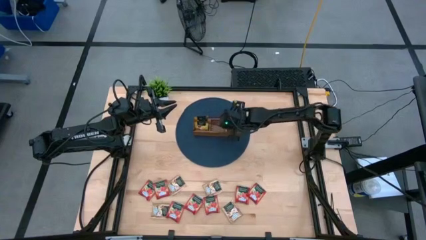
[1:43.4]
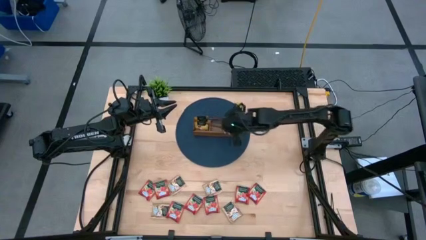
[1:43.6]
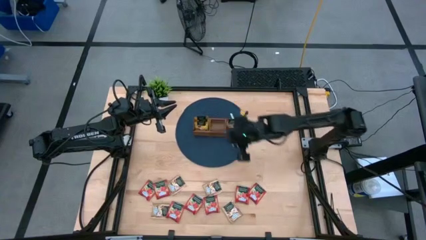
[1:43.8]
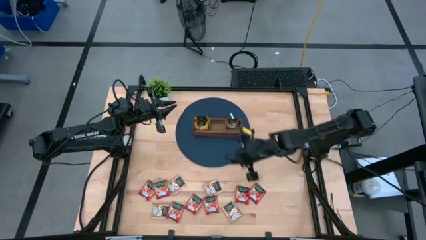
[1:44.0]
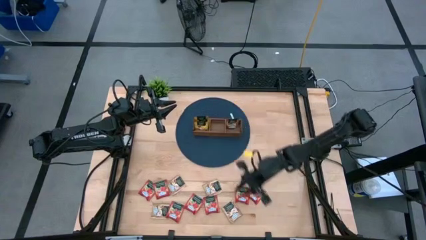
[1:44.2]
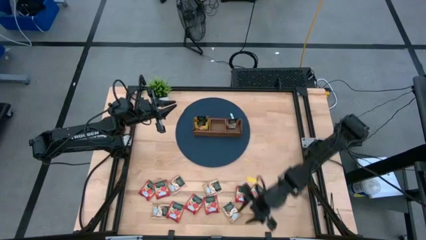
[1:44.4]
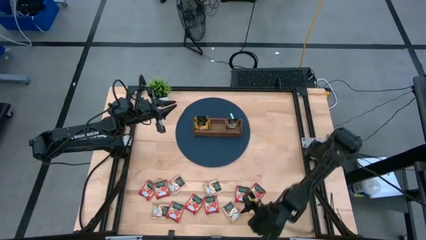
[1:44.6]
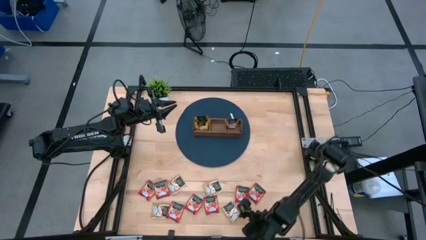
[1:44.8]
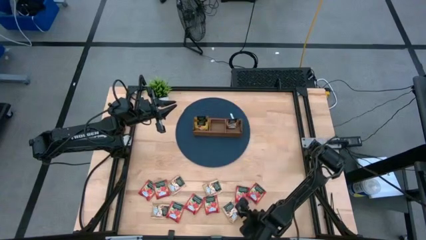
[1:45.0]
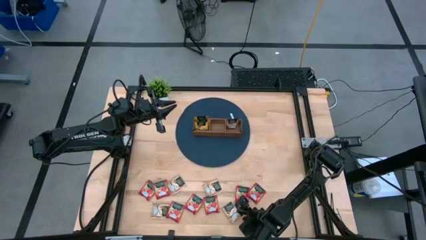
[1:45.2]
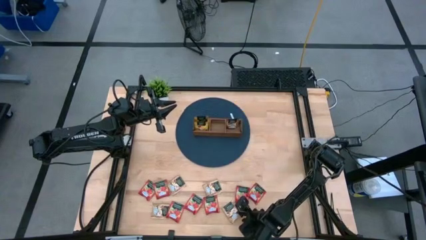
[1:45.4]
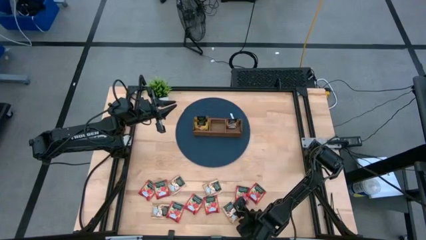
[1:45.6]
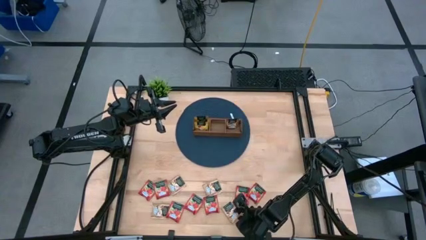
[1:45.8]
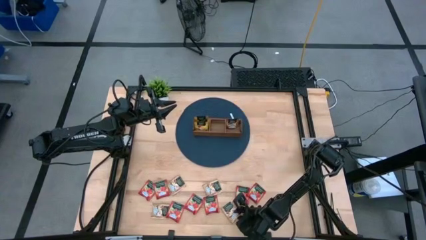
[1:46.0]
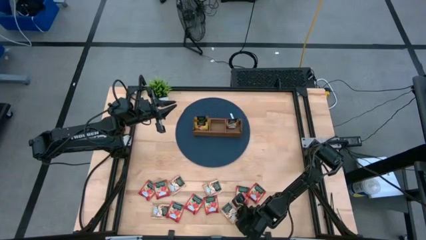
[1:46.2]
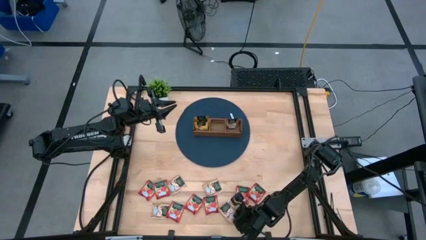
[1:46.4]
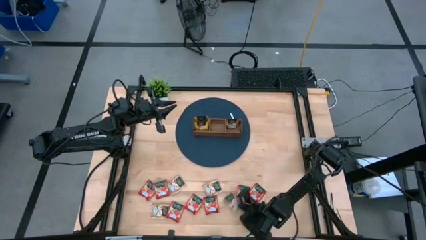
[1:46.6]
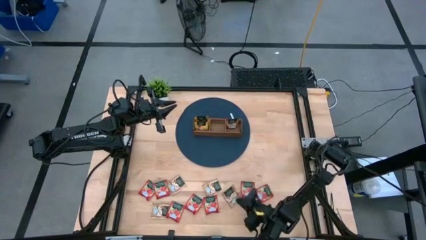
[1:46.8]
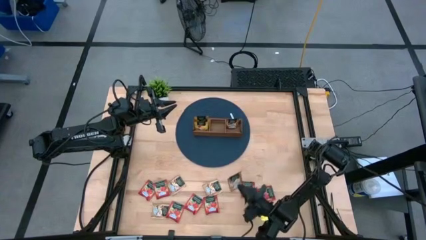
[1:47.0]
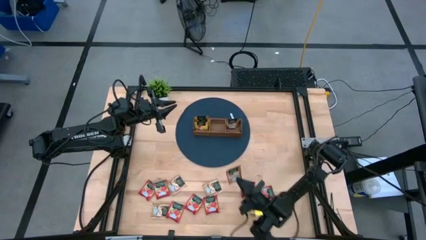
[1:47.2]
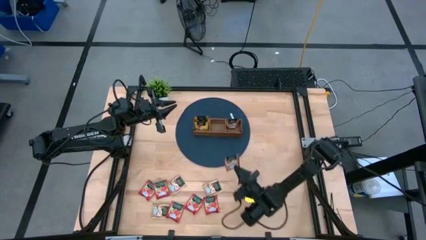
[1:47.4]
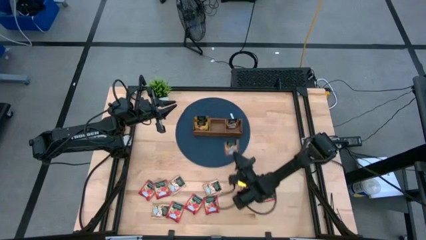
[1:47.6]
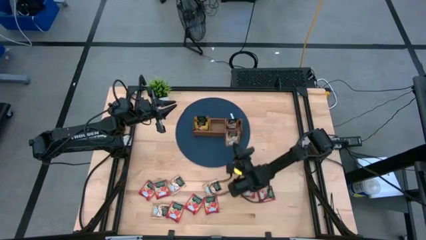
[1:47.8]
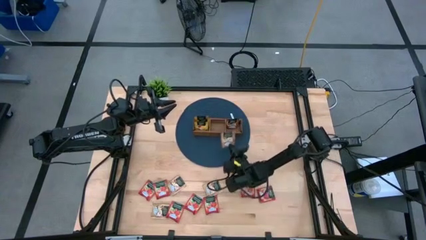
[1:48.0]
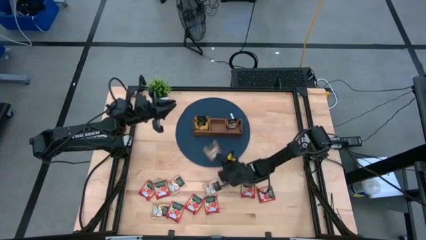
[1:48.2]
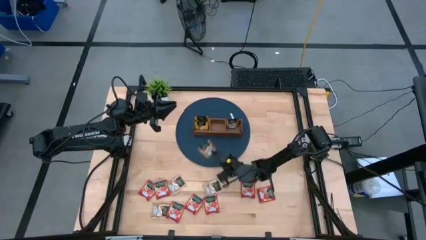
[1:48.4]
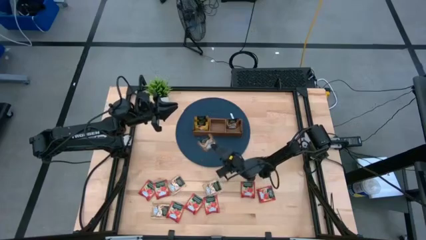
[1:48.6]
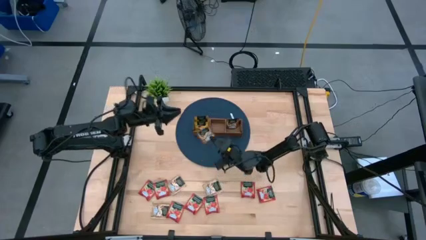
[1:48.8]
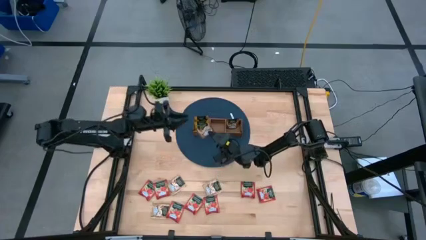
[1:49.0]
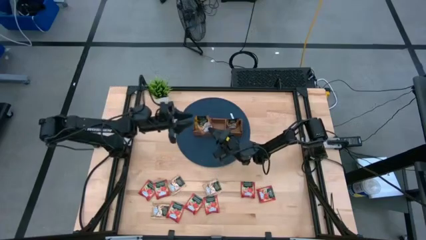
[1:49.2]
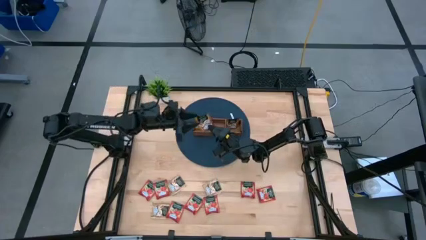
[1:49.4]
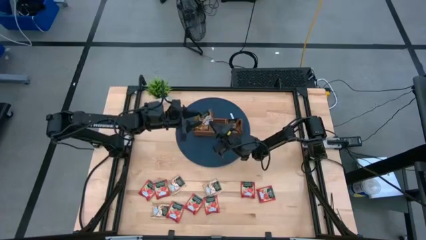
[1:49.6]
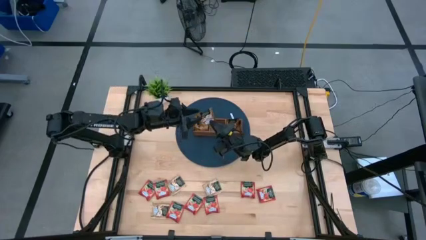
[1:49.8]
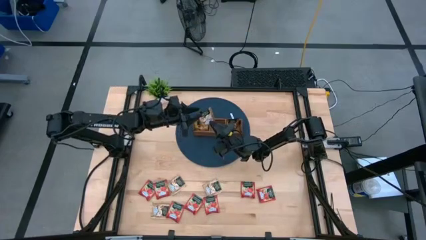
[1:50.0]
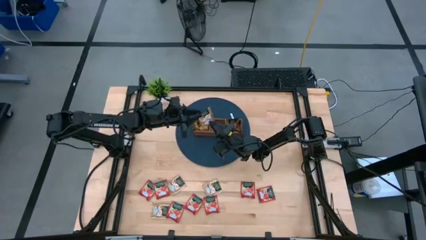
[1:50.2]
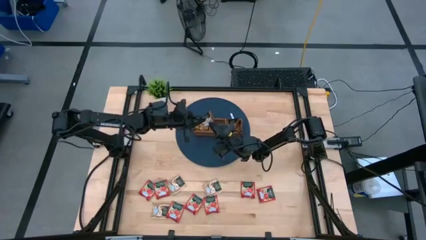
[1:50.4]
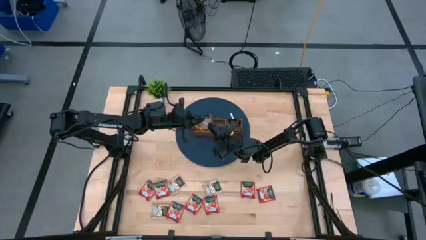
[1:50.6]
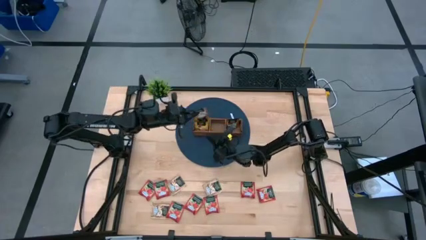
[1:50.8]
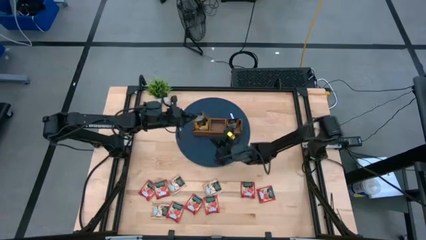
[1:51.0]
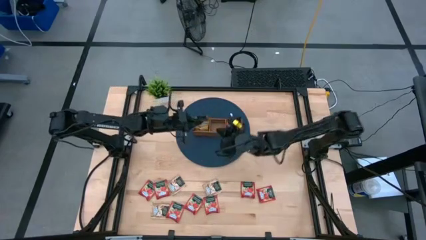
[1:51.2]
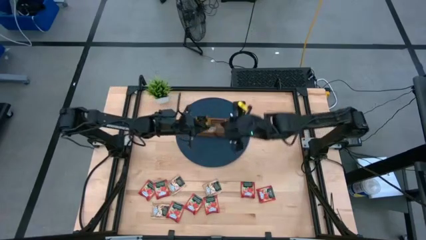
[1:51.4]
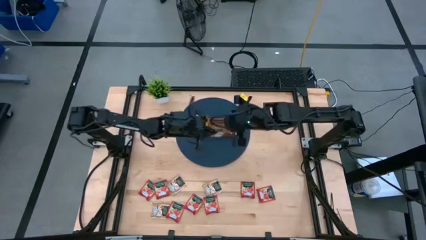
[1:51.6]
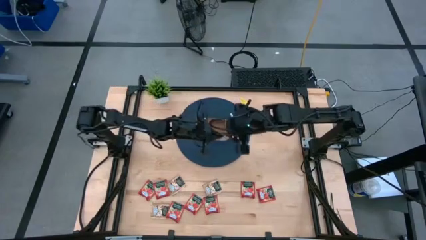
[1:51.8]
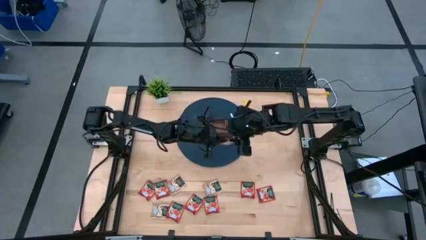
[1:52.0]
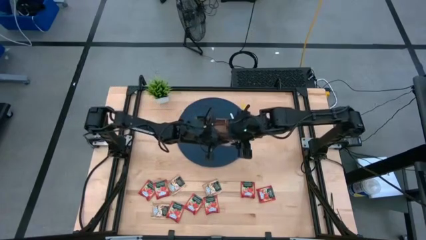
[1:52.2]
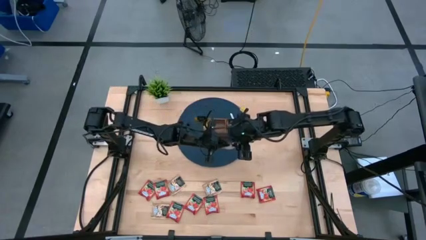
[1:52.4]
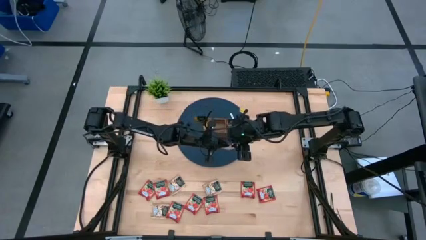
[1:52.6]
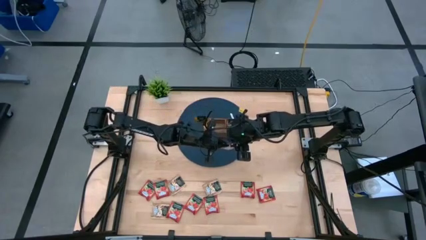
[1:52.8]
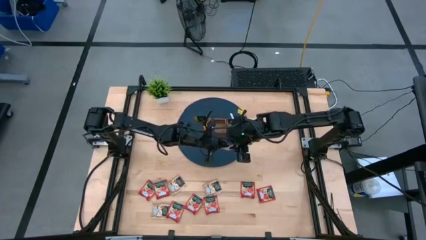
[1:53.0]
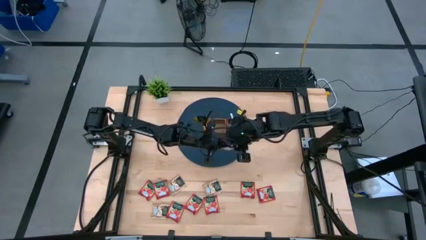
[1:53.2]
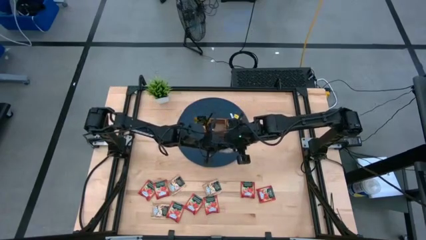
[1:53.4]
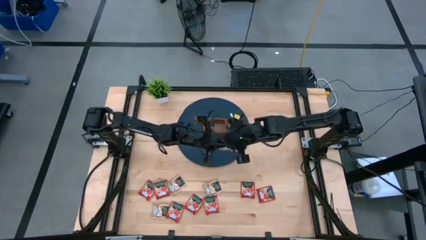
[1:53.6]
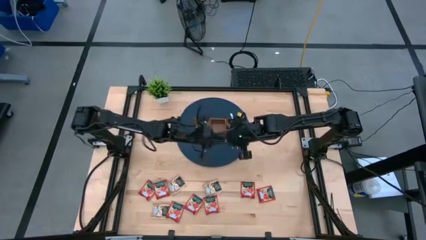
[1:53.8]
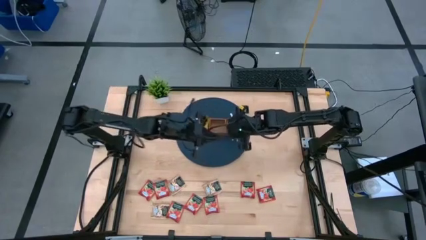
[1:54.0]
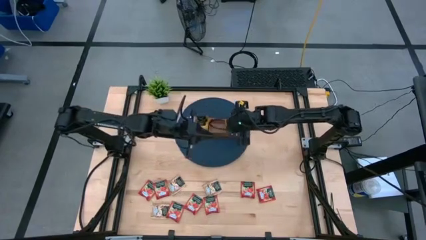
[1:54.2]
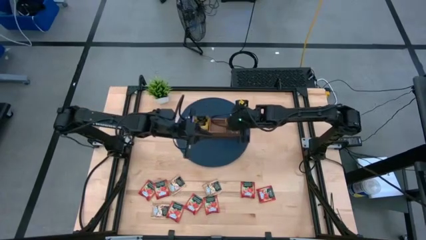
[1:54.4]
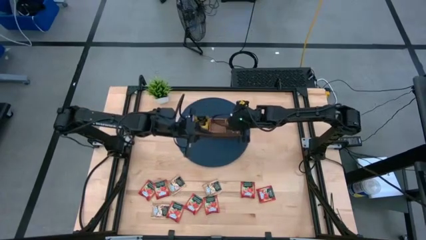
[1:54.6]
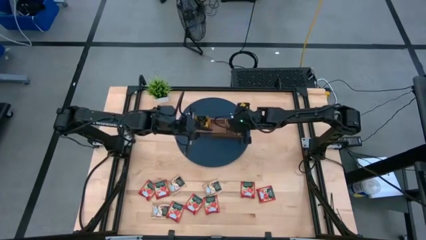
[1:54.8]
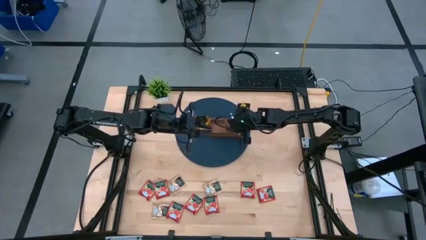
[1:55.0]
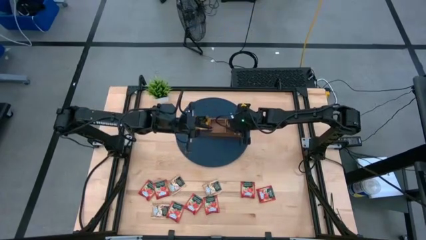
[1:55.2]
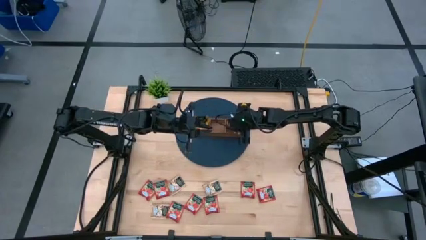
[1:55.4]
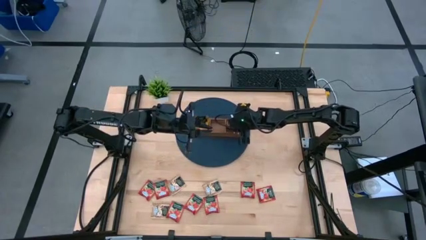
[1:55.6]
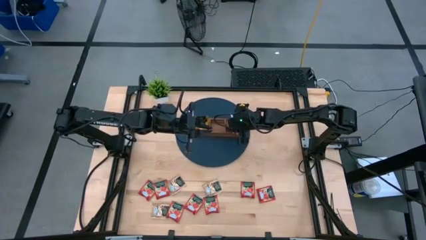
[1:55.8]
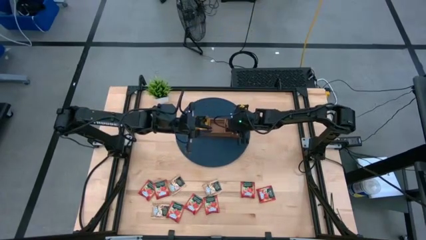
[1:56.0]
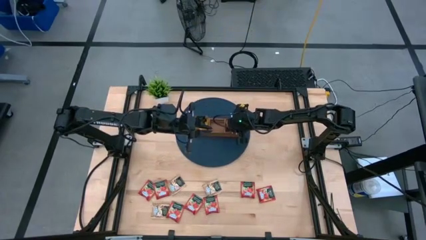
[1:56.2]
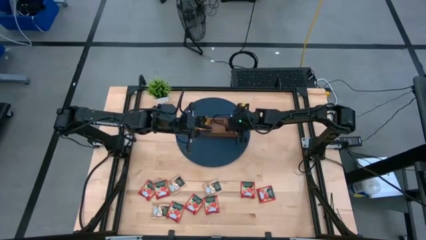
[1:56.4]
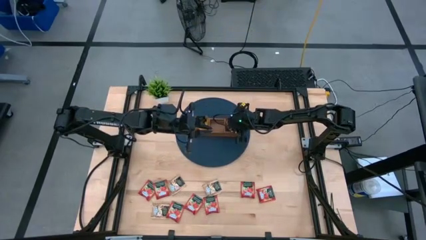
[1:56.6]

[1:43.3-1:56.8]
Task: Pick & Place Tea
Put the brown tea bag into the right section of the wooden organizer

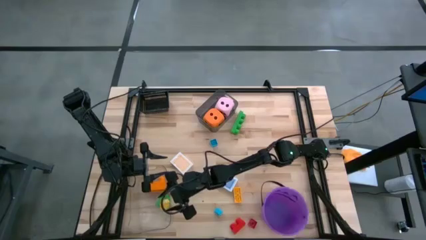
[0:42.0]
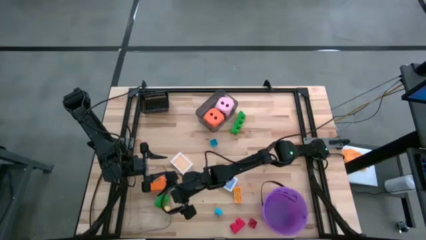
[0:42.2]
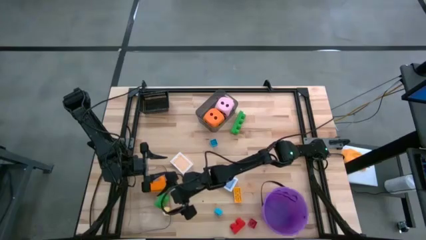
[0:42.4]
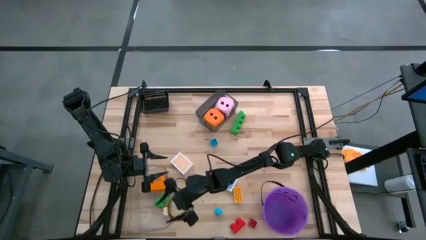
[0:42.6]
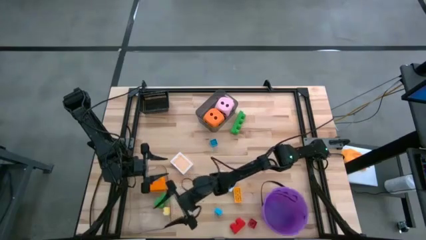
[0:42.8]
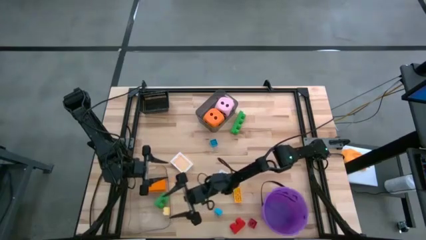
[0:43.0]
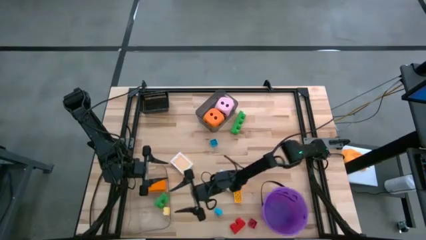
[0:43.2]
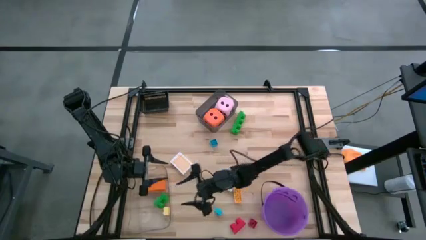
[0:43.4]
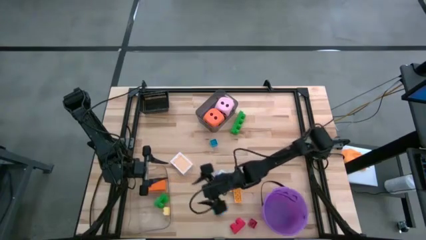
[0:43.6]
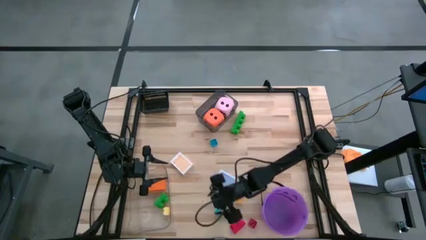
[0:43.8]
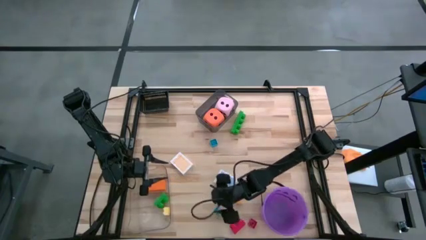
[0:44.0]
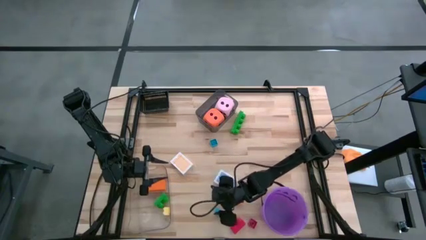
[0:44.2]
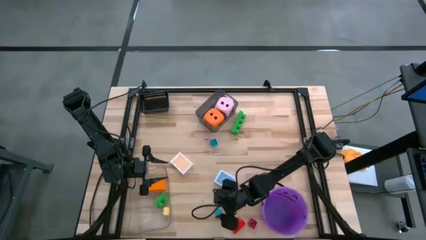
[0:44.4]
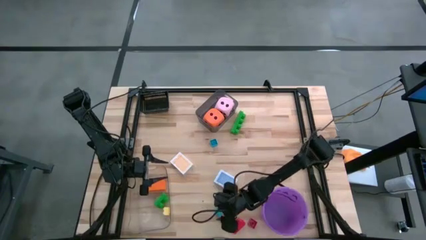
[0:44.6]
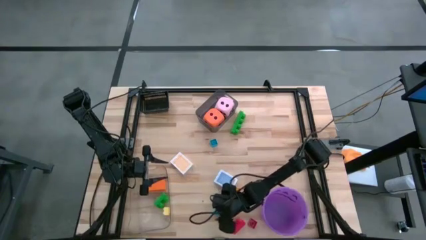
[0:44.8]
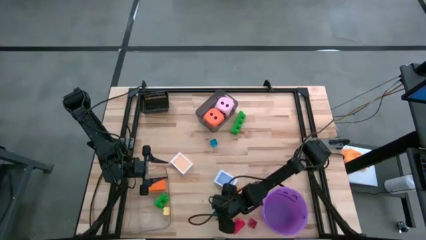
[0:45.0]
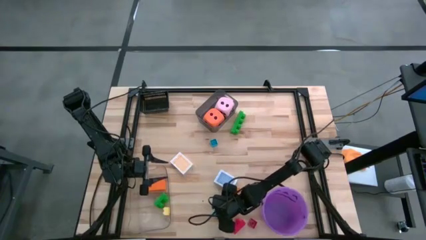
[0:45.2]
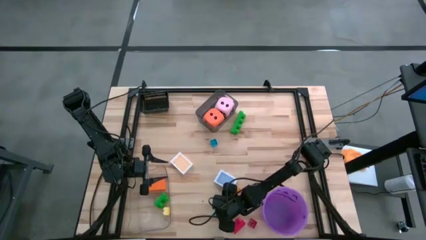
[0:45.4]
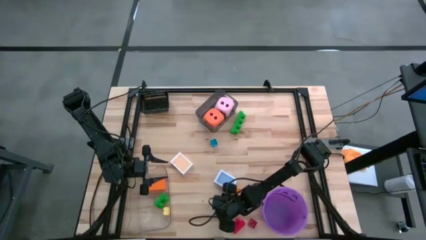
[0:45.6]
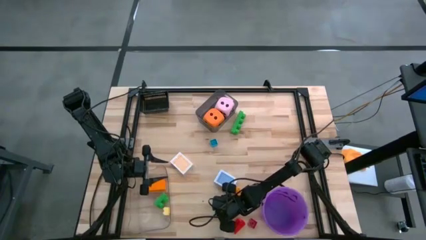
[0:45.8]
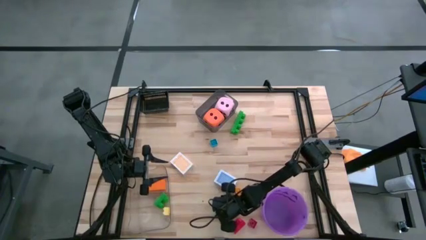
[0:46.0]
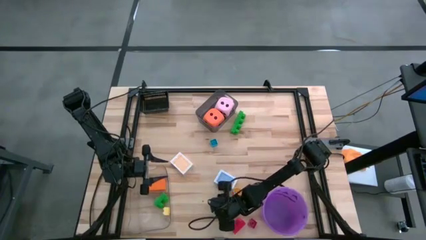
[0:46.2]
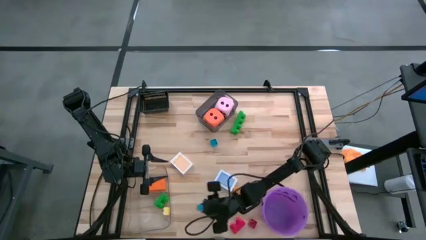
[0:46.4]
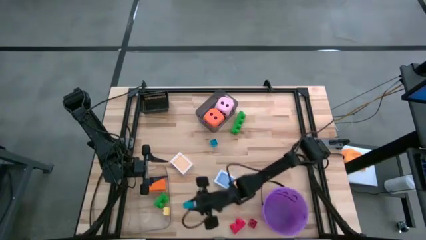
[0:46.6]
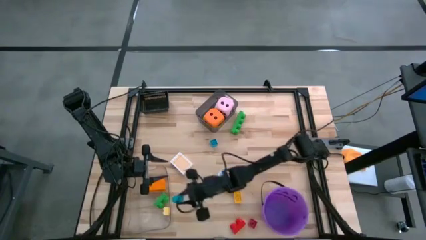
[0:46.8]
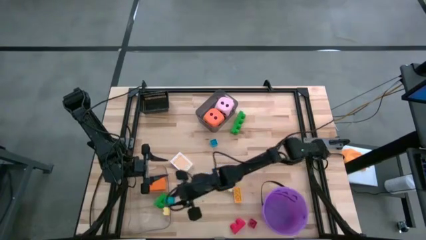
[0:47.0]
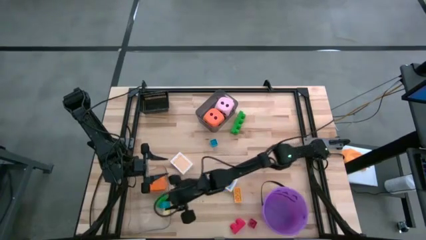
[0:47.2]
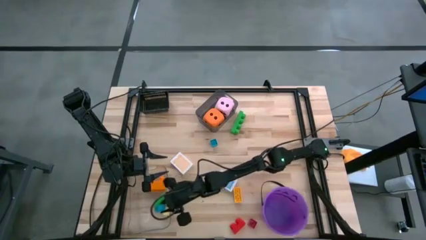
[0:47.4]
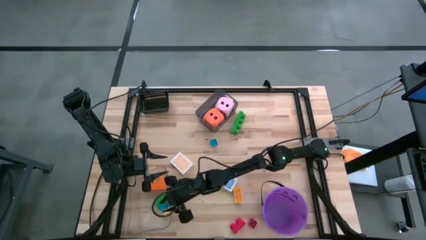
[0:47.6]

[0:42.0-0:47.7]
Task: Pick & Place Toys
Put the blue game piece into the transparent bin
